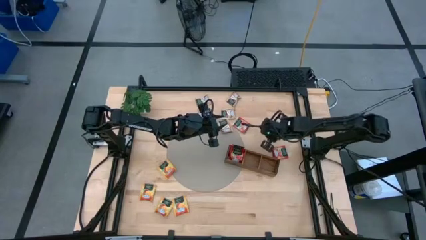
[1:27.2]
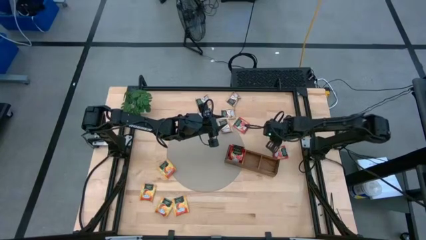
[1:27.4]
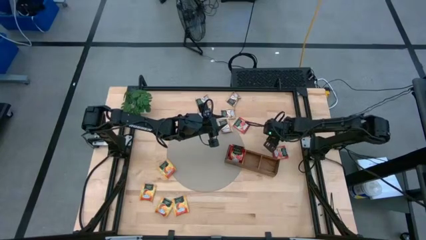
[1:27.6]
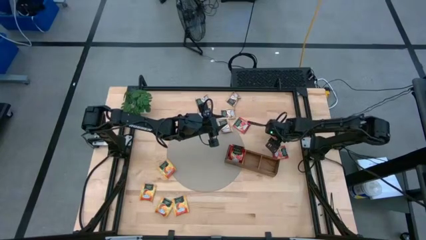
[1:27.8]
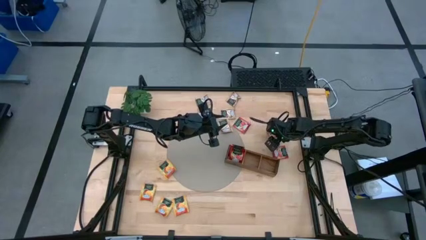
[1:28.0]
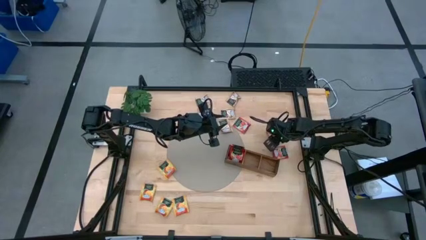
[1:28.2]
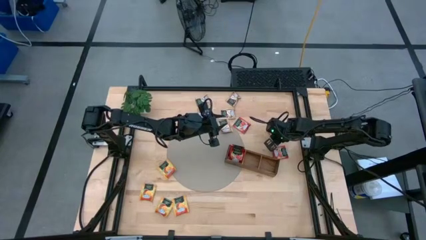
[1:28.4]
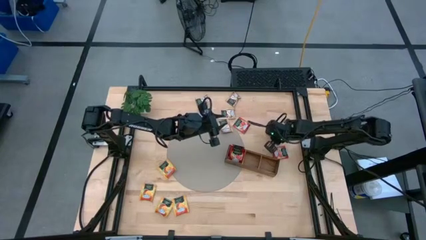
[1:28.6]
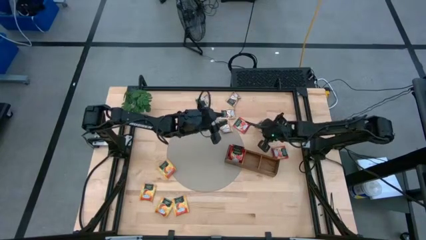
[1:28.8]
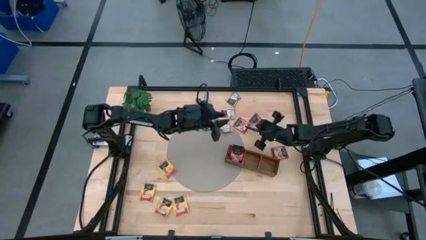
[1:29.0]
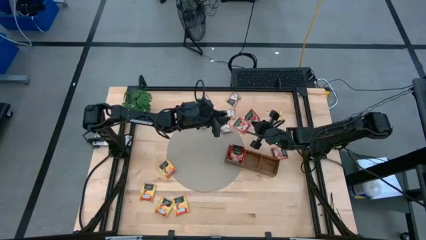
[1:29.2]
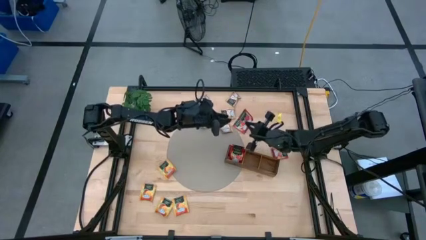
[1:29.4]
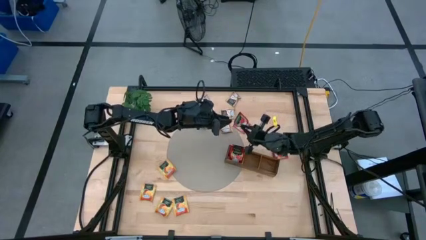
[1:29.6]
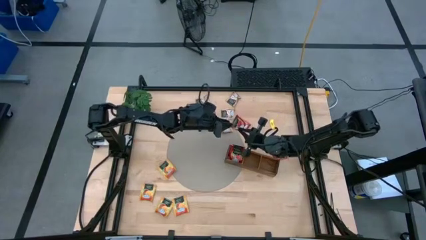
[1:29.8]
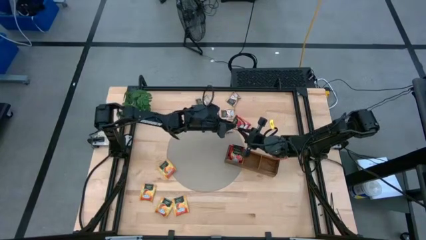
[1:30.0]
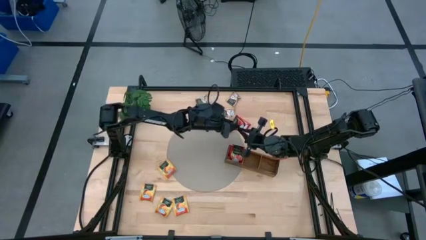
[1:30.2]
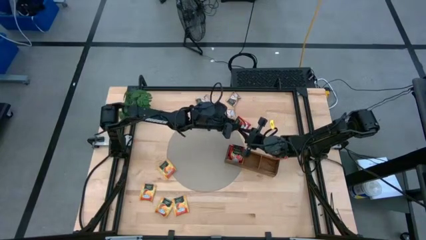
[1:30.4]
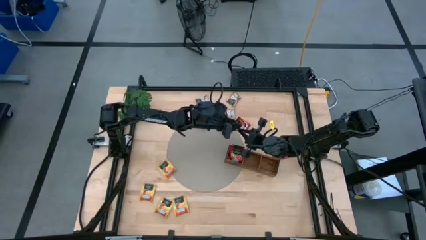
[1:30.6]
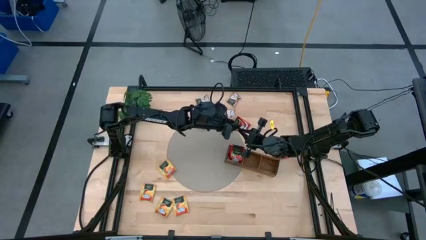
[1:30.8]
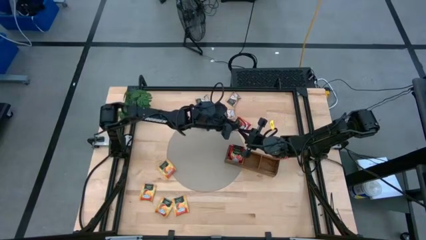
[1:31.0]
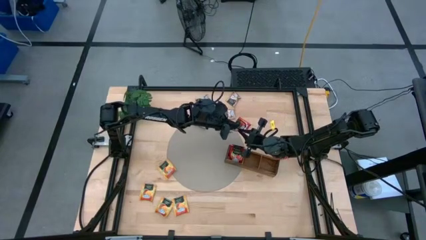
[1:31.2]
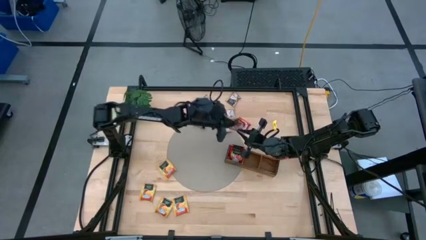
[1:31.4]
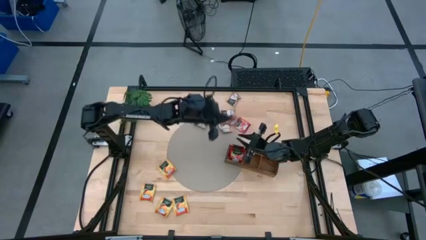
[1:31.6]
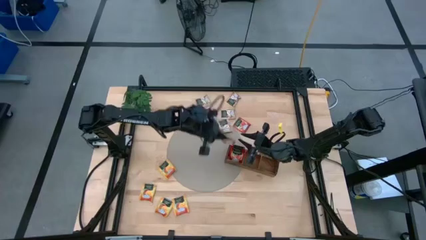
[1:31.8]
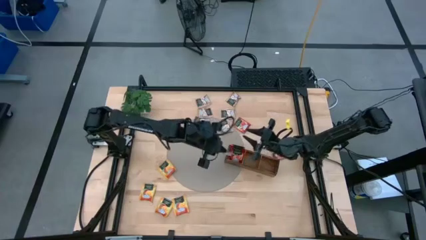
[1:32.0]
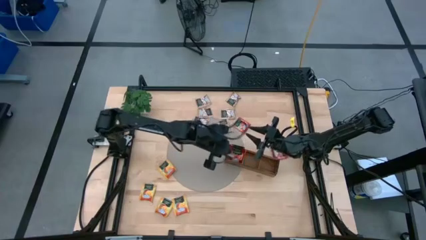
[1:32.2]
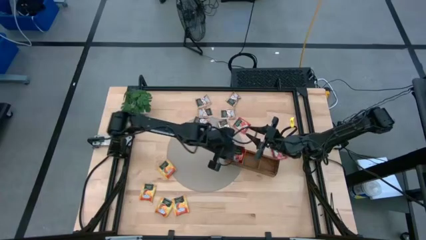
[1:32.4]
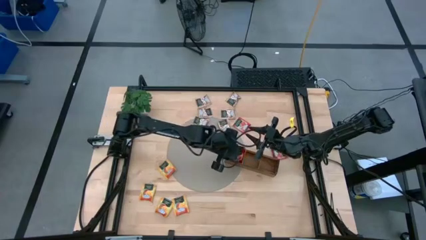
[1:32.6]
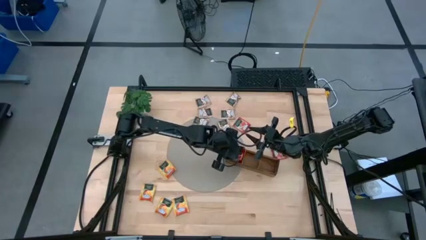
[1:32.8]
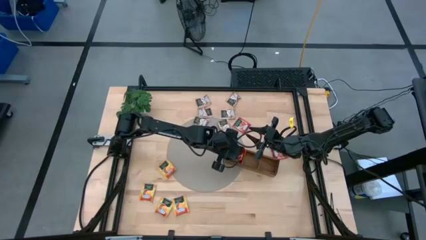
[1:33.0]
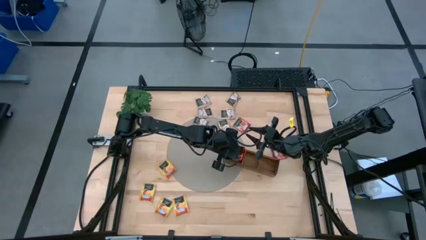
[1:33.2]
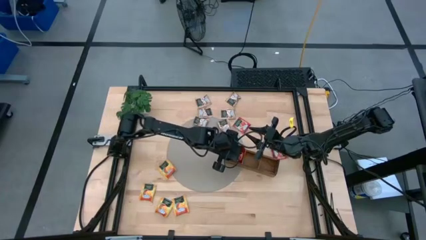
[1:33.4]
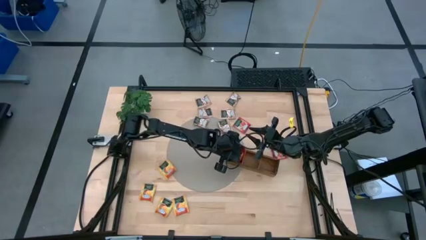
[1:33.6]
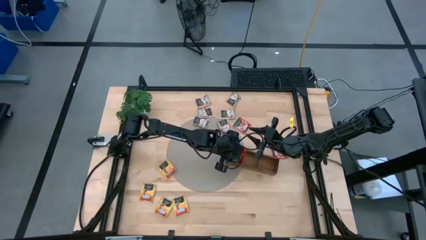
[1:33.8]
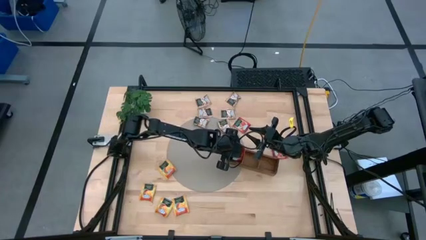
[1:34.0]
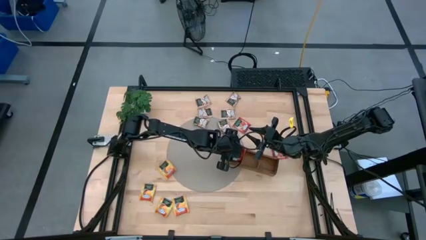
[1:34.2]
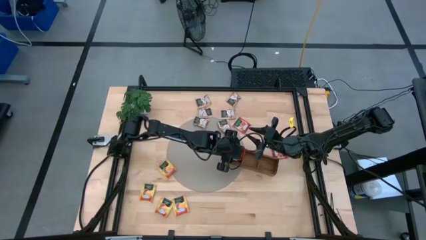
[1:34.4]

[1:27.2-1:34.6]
Task: Pick & Place Tea
Put the red tea bag into the left section of the wooden organizer

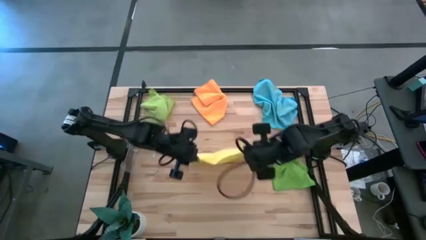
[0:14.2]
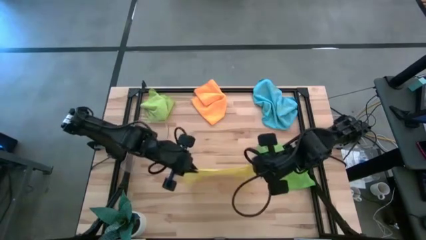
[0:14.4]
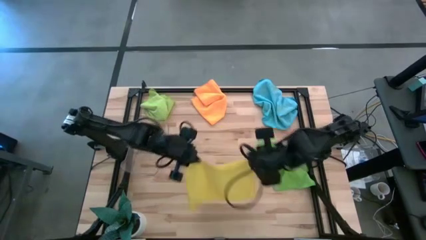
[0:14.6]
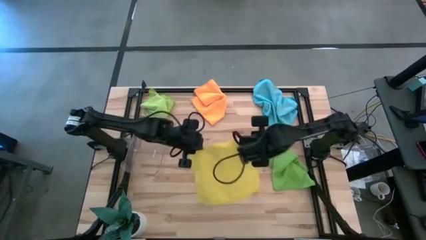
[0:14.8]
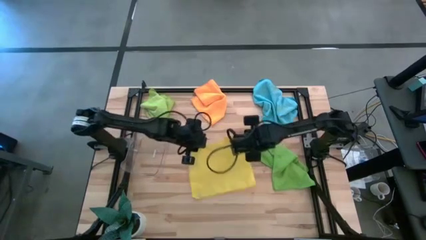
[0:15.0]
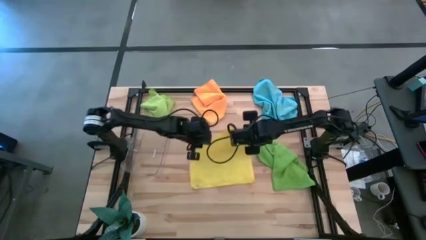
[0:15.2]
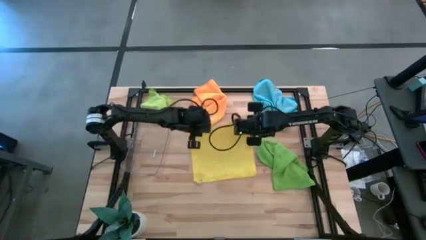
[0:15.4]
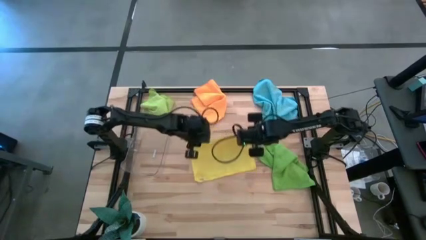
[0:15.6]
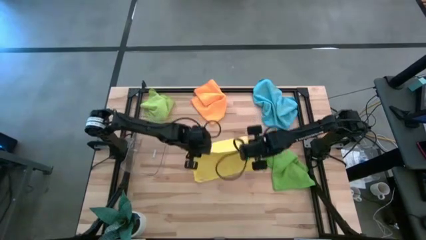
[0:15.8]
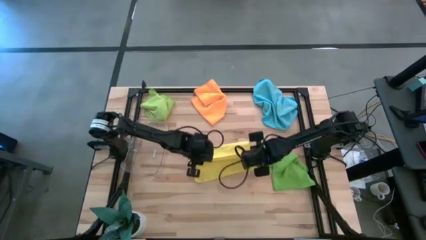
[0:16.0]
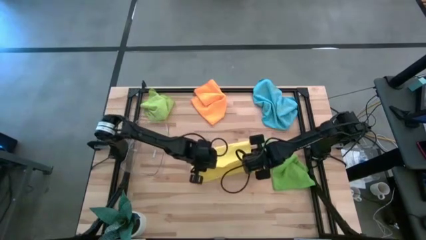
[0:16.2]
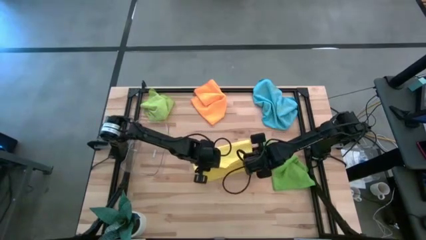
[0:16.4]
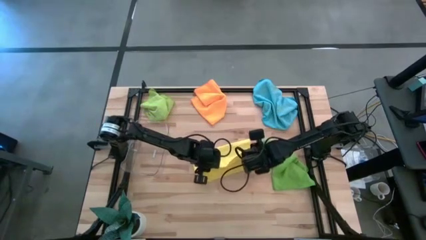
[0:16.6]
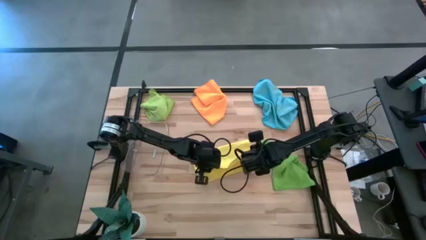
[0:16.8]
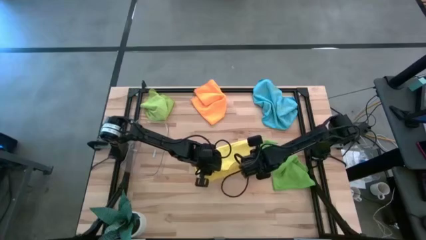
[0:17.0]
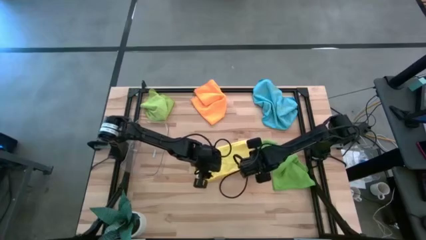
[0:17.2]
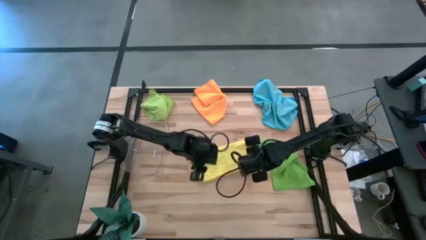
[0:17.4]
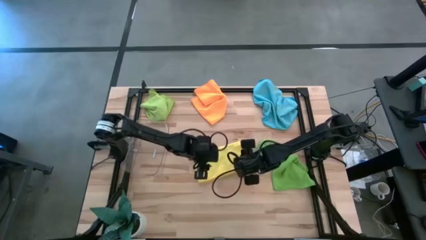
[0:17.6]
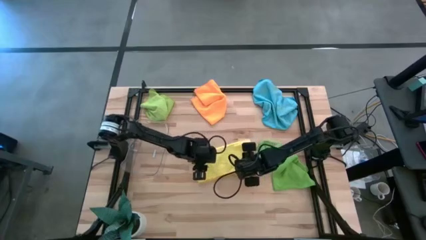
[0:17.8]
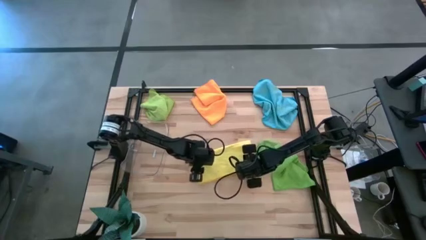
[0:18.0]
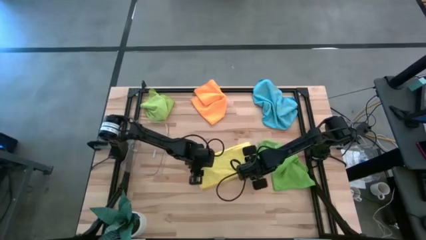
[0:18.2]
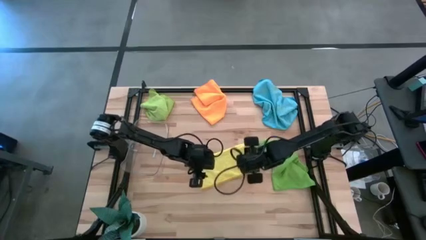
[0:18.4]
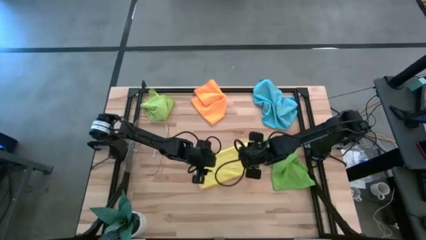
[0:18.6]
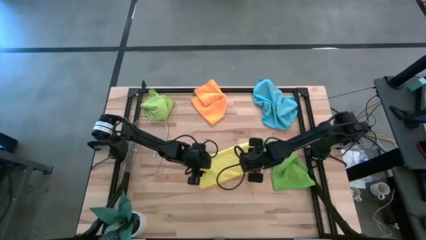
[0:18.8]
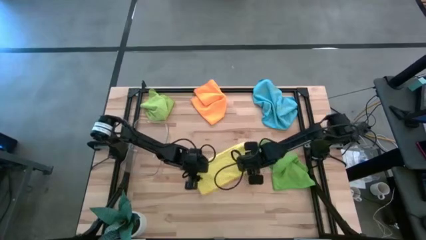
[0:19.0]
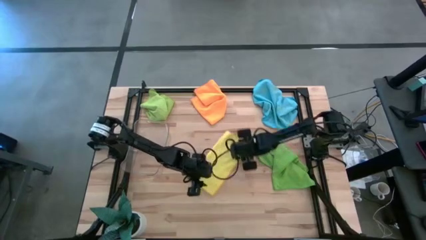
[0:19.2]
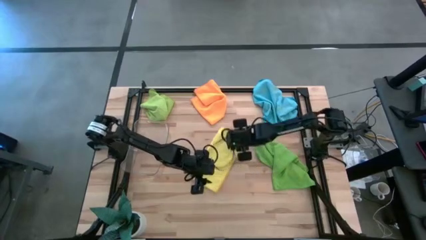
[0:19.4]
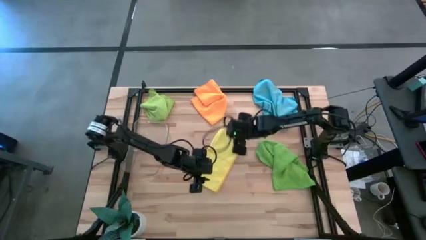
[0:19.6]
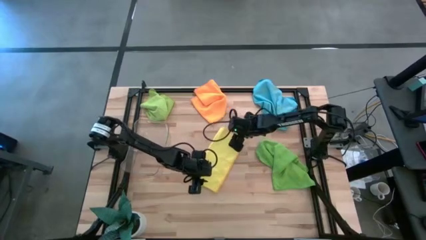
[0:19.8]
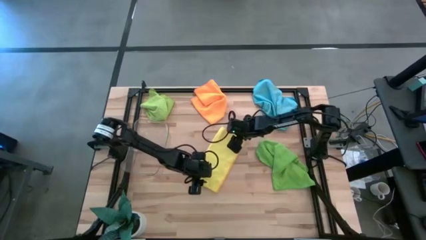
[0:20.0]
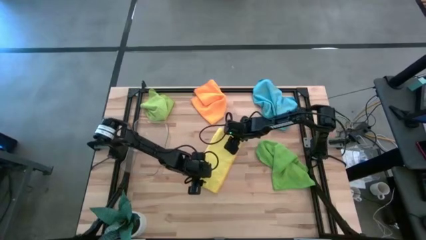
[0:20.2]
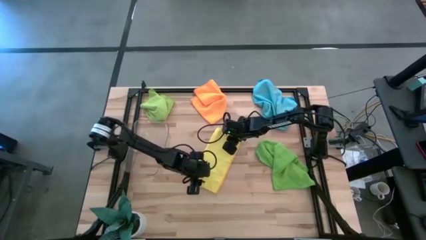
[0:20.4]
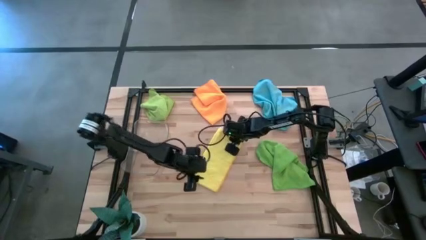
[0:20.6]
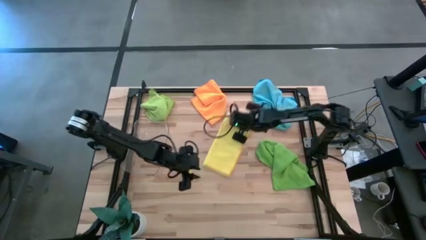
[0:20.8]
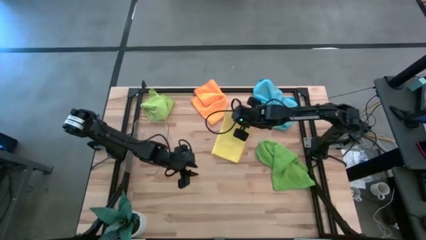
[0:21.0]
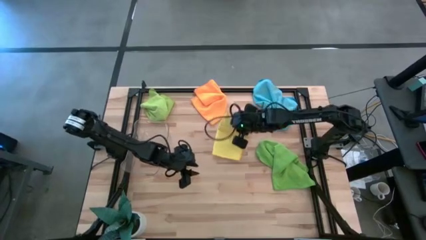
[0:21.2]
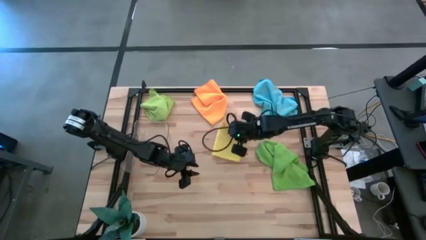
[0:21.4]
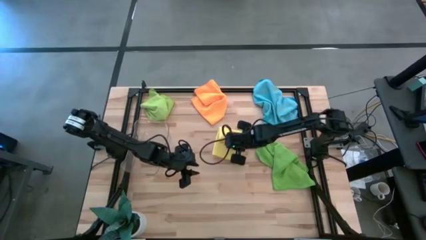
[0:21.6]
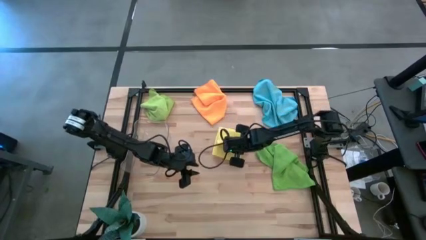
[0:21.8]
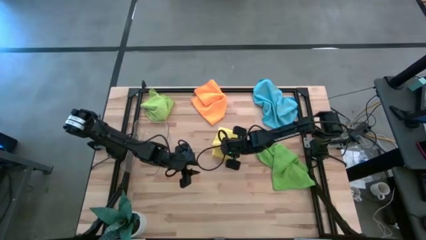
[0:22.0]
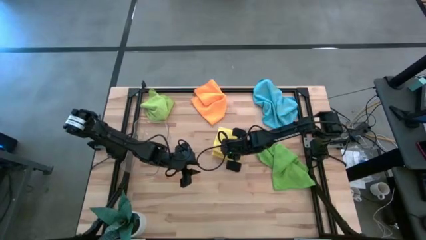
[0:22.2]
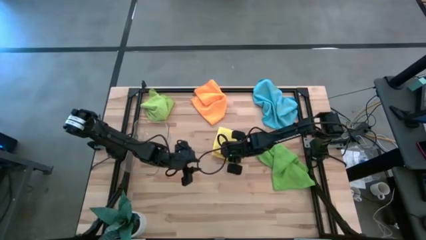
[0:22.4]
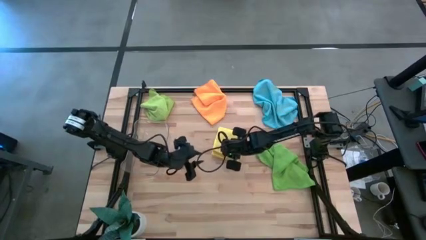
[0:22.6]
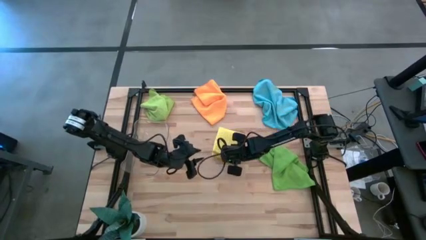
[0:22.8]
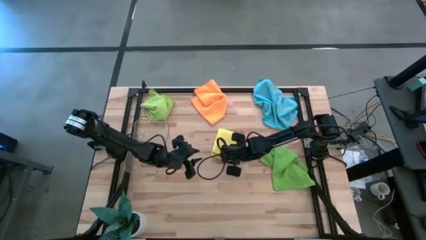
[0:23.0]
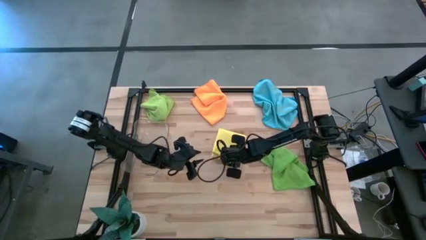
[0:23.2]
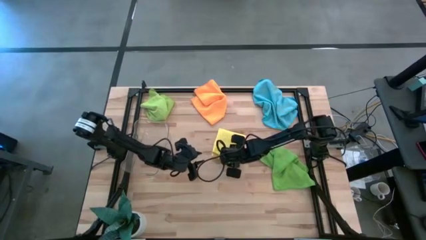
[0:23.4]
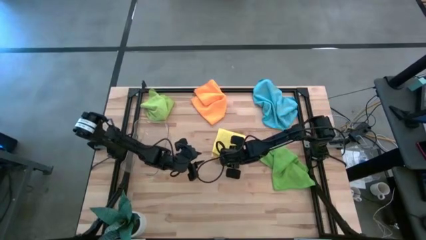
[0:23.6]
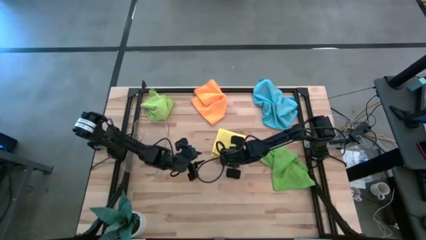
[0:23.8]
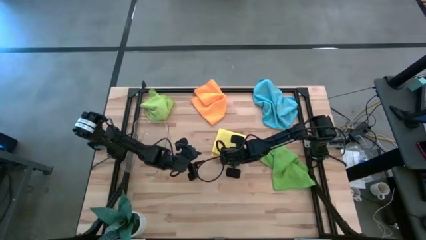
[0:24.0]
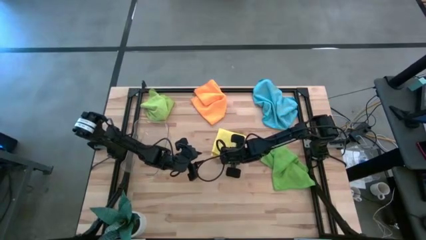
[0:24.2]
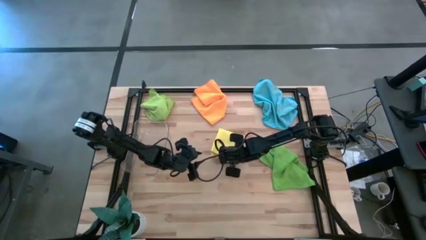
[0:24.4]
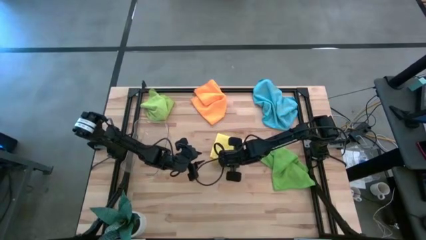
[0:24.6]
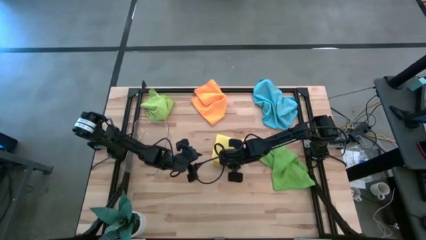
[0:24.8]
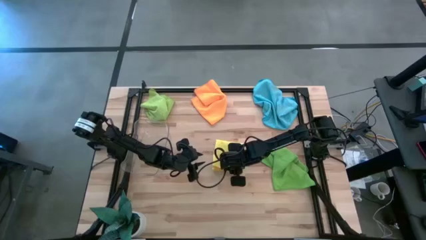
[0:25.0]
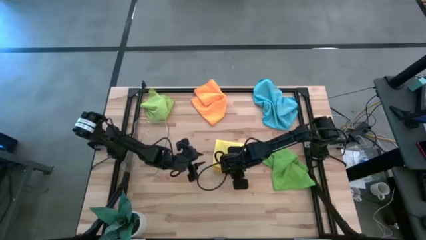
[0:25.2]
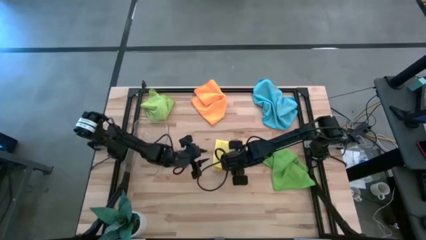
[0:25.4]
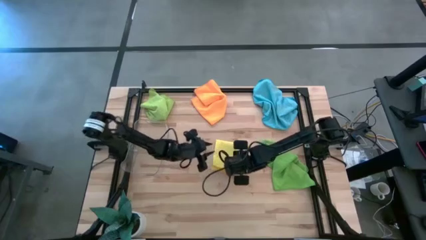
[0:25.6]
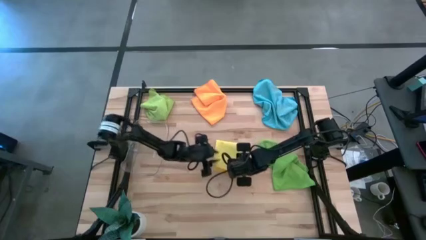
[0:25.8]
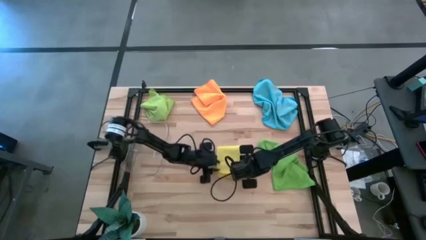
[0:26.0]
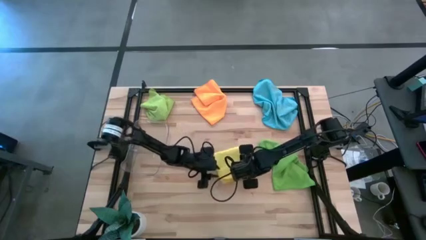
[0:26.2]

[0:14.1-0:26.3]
Task: Fold microfiber towels
Fold the yellow microfiber towel on the table
